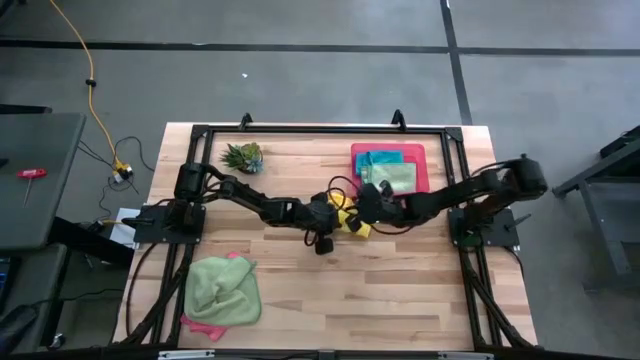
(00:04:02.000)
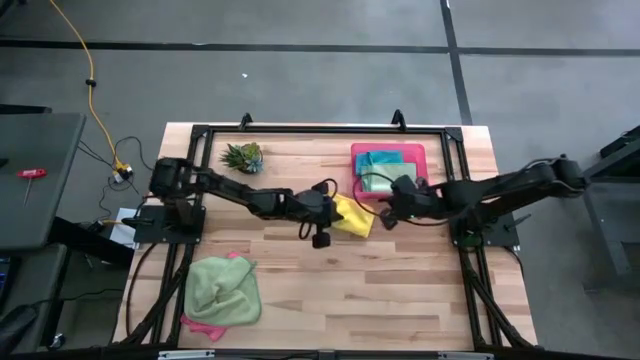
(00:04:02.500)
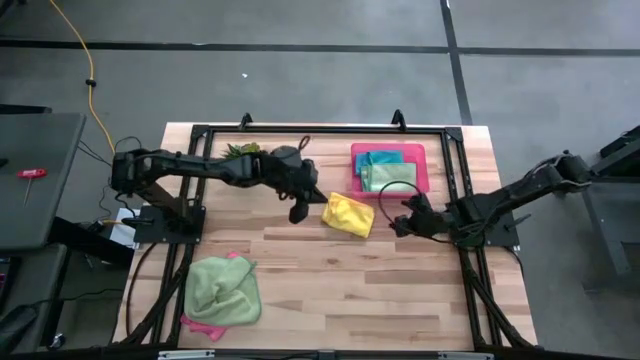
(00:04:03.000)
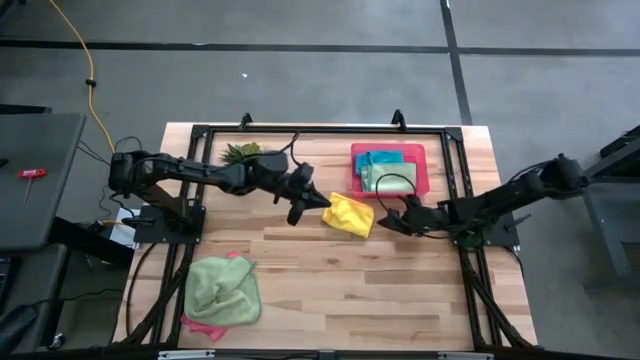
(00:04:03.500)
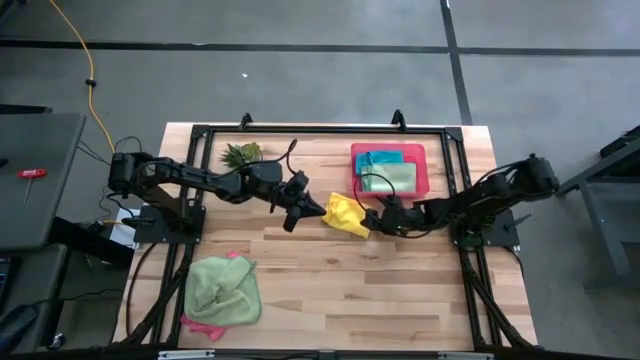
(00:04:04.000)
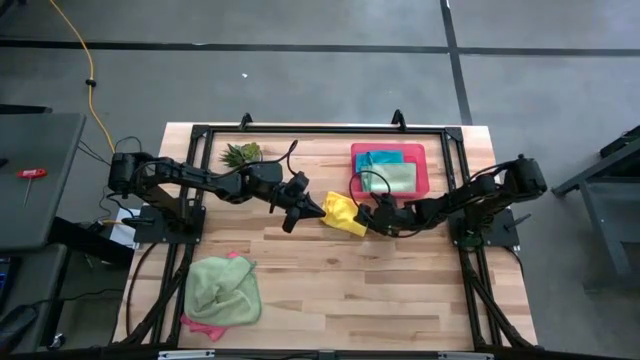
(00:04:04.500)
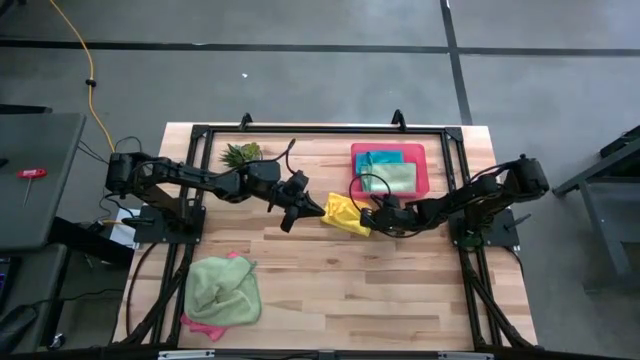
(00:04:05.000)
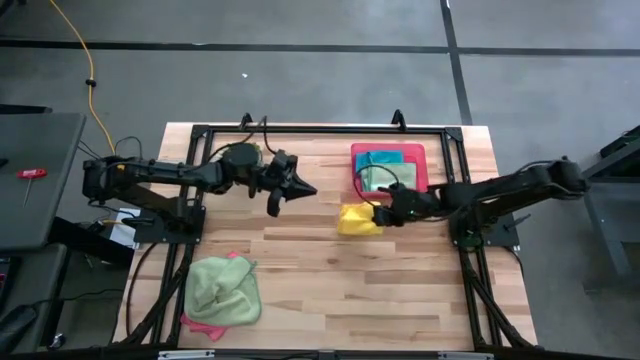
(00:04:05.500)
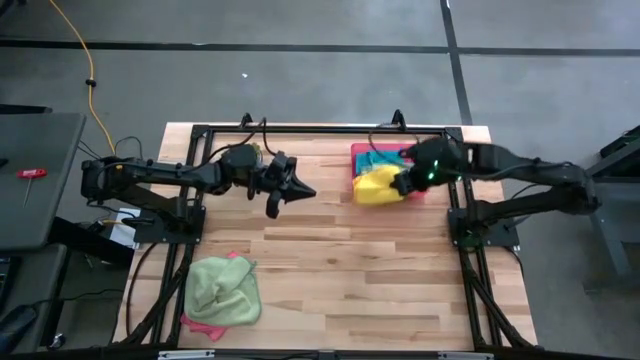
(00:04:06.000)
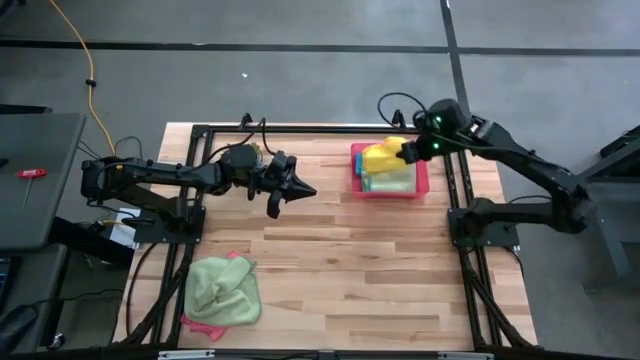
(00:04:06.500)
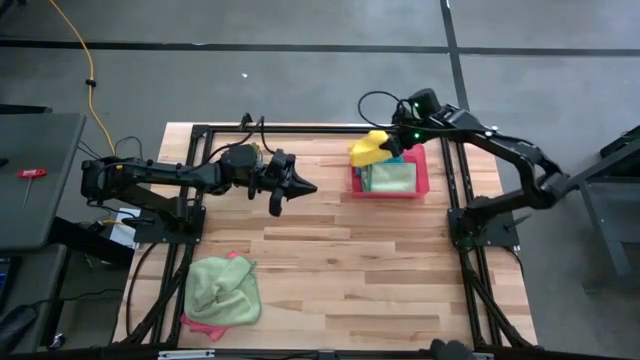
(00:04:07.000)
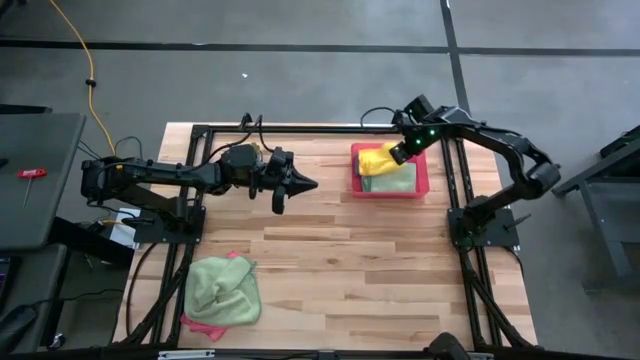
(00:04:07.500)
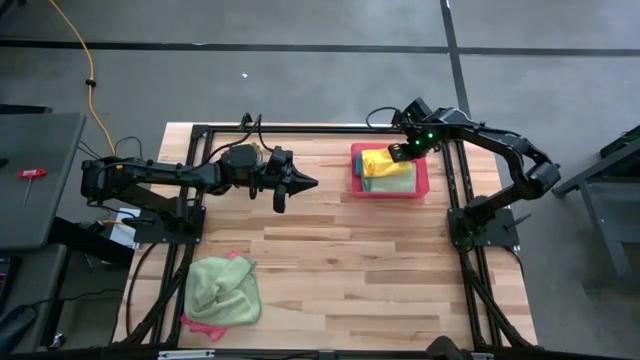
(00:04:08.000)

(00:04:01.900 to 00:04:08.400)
Task: Fold microfiber towels
Stack the folded yellow microfiber cloth on top of the blue microfiber cloth in the pink bin
